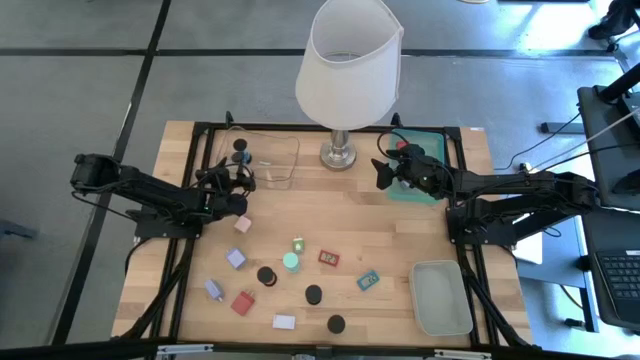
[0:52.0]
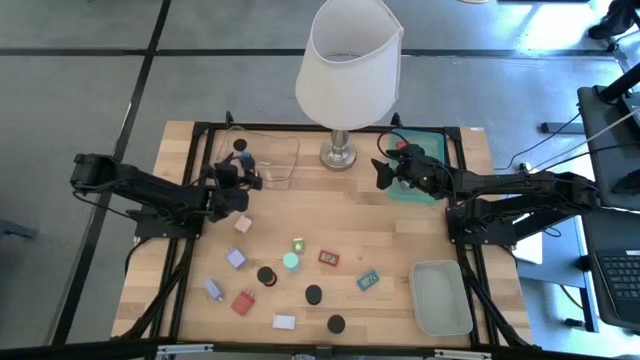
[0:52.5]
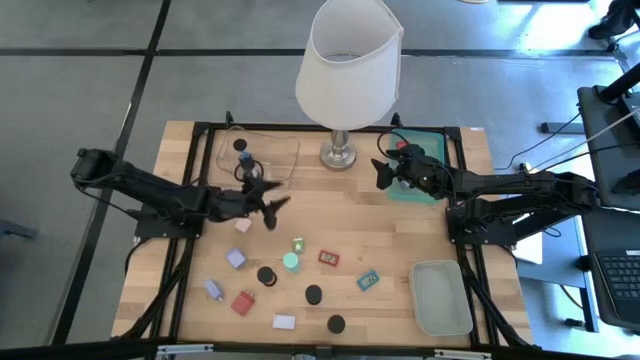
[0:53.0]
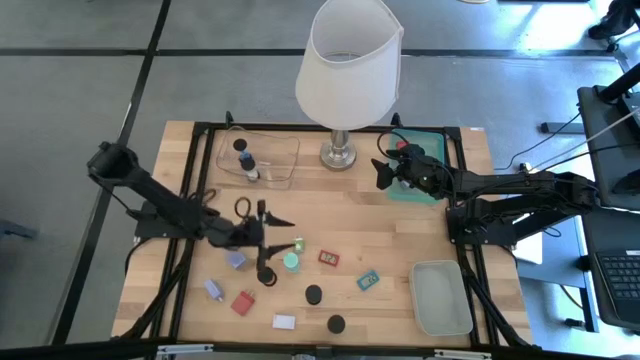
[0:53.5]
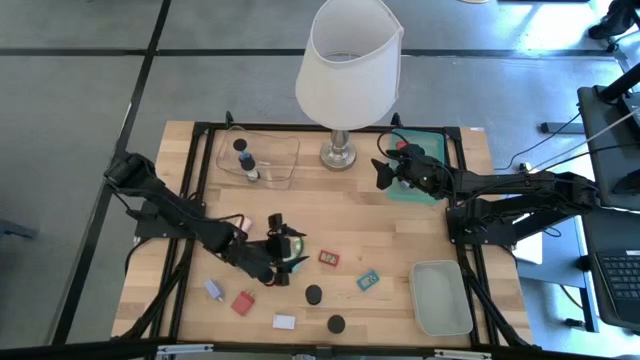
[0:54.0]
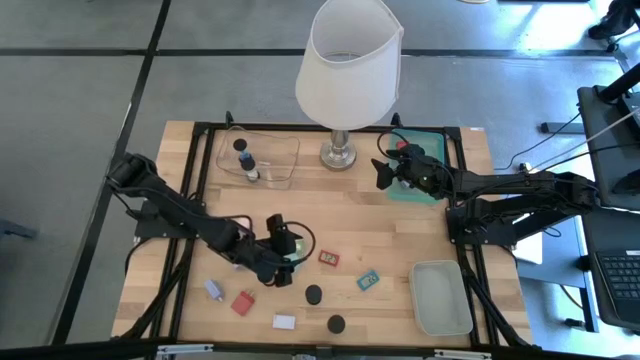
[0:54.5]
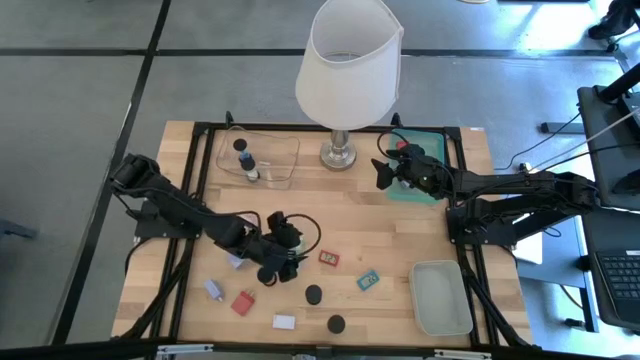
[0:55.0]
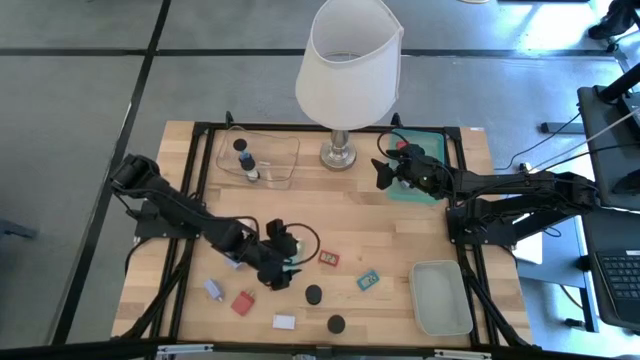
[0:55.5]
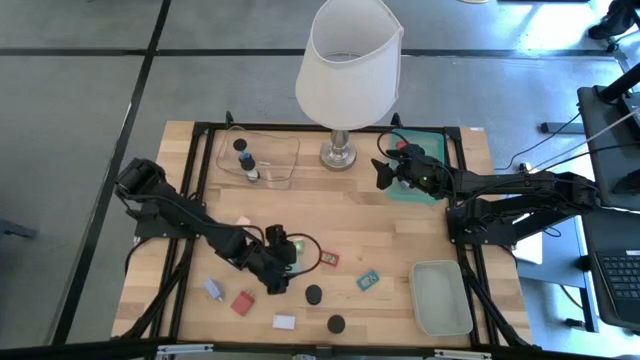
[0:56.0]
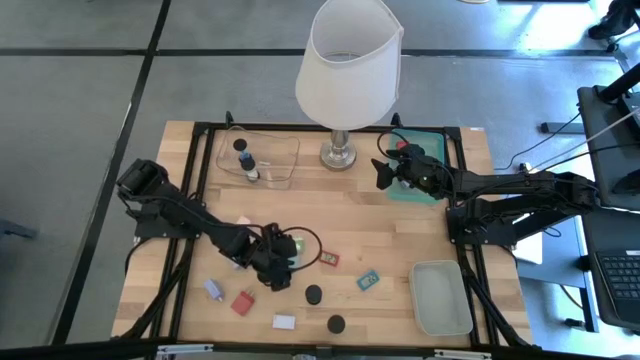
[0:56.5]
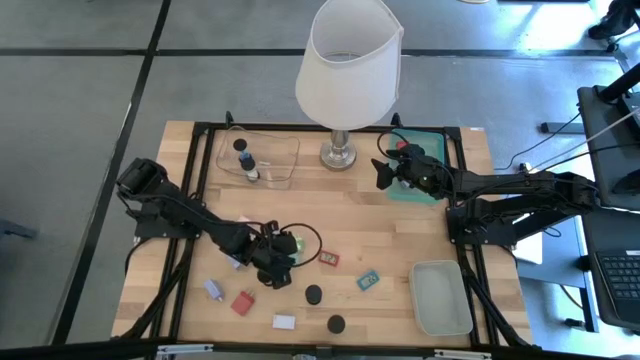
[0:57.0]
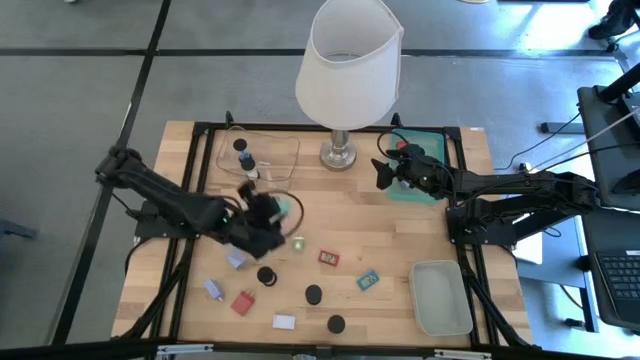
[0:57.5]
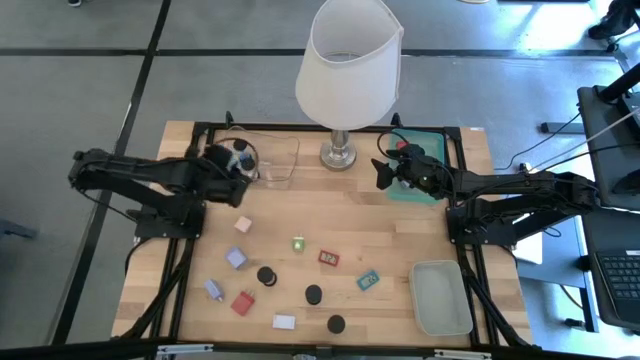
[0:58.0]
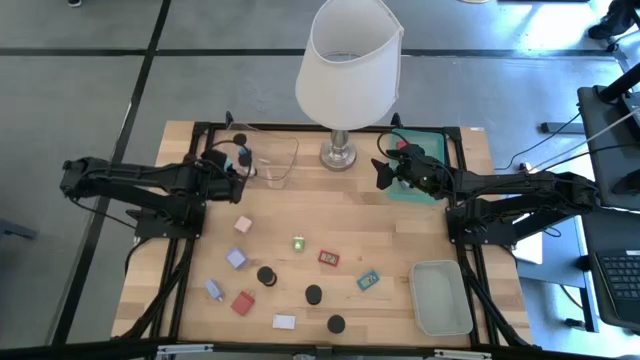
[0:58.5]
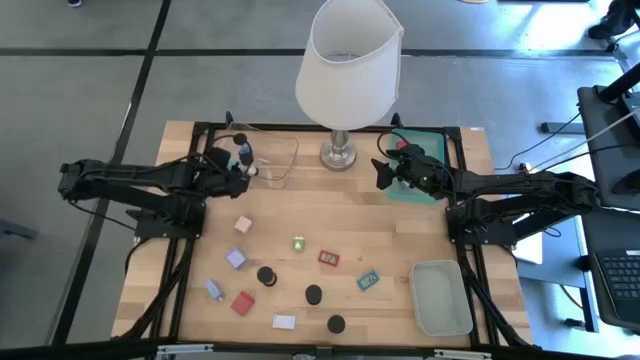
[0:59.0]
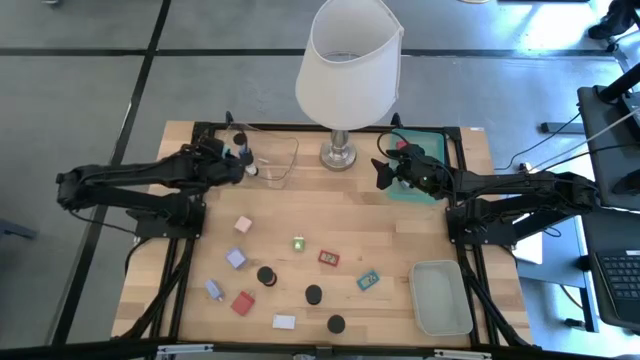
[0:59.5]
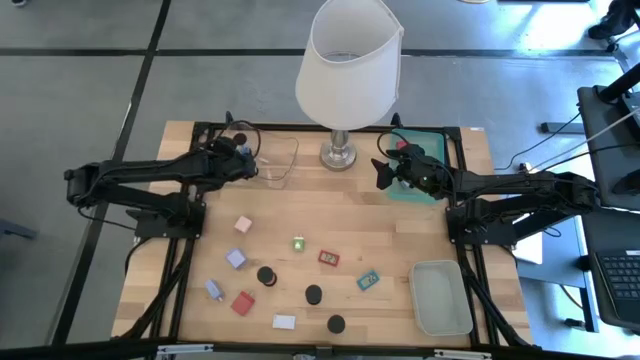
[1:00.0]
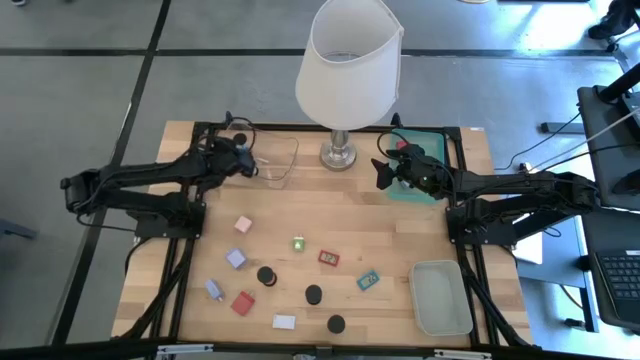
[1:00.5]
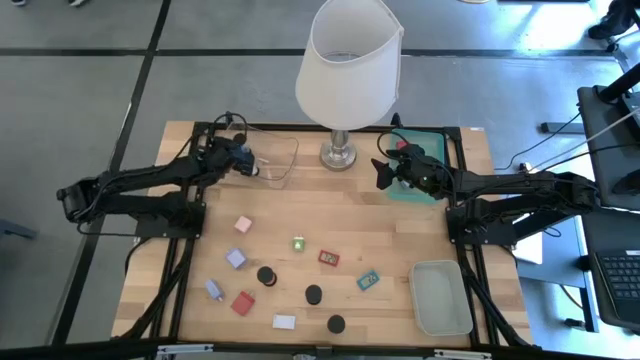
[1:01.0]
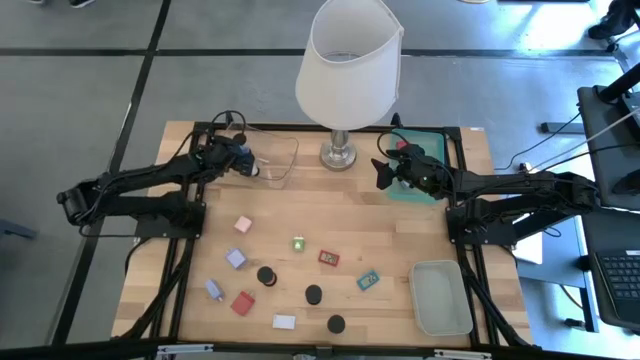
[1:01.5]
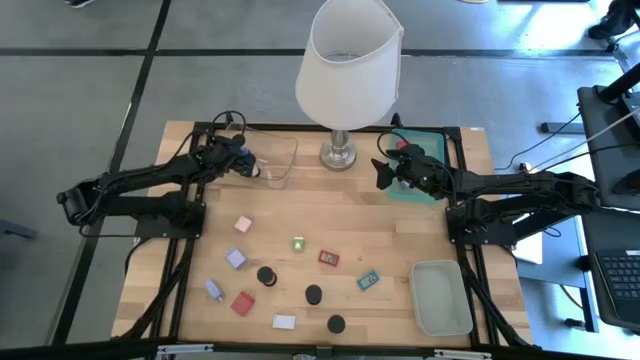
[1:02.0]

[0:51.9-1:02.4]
Task: Pick & Place Office items
Put the light green hourglass into the transparent bin

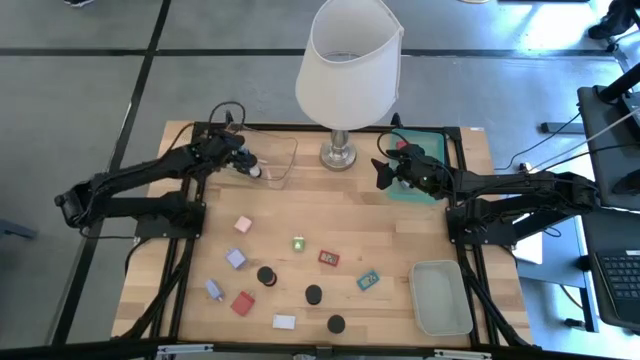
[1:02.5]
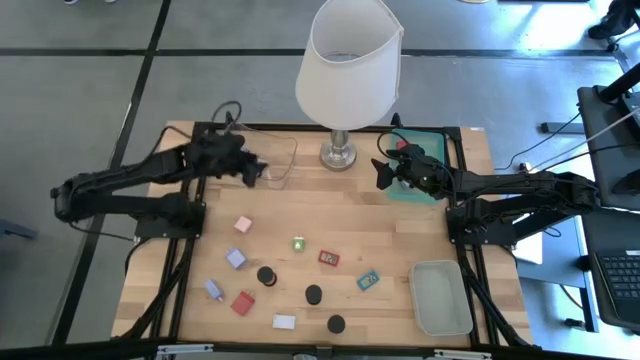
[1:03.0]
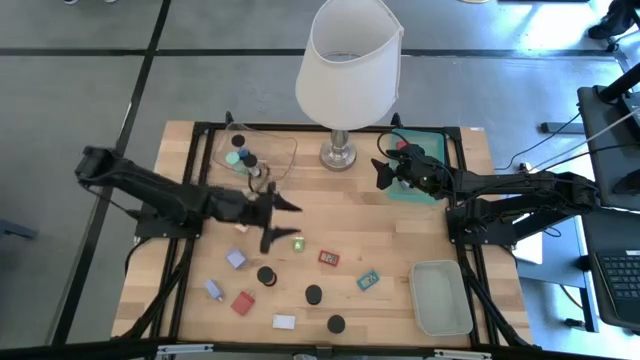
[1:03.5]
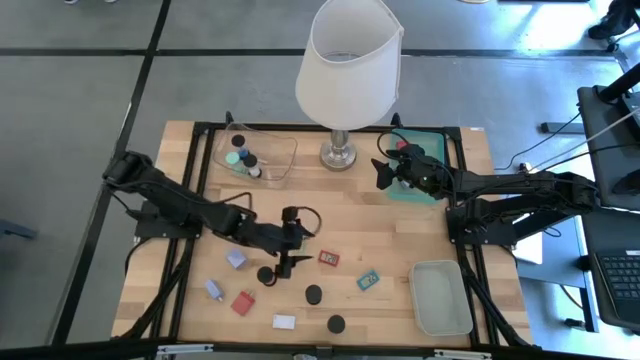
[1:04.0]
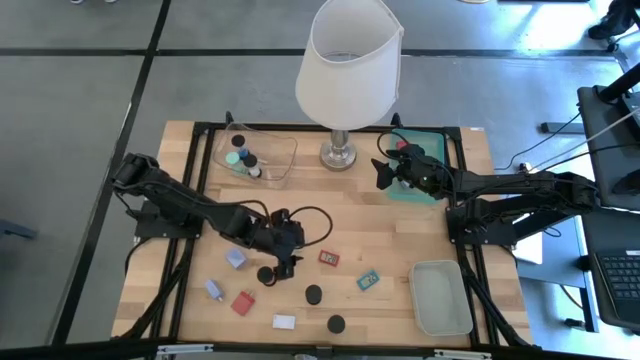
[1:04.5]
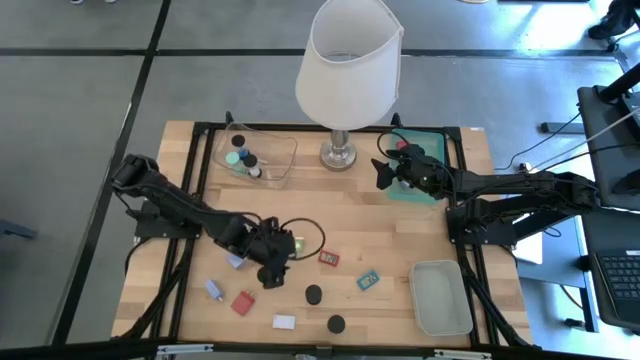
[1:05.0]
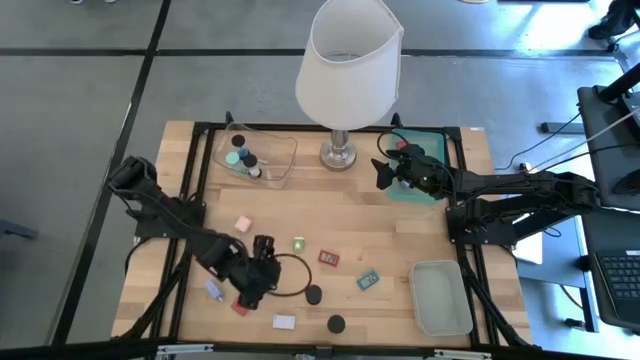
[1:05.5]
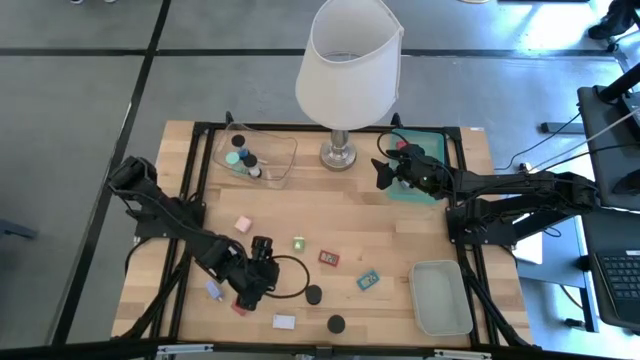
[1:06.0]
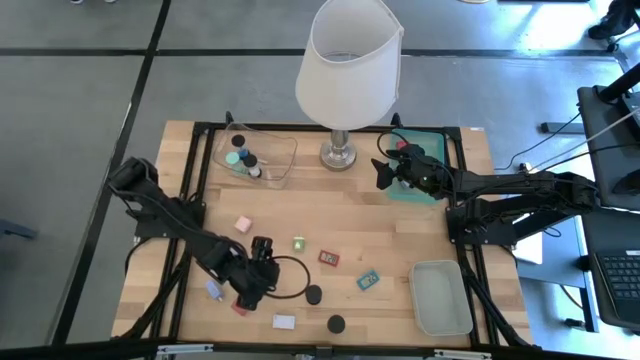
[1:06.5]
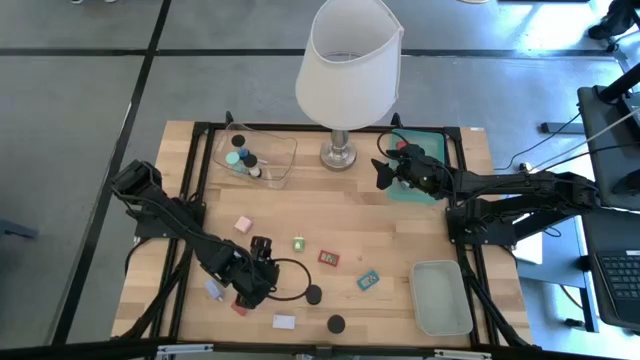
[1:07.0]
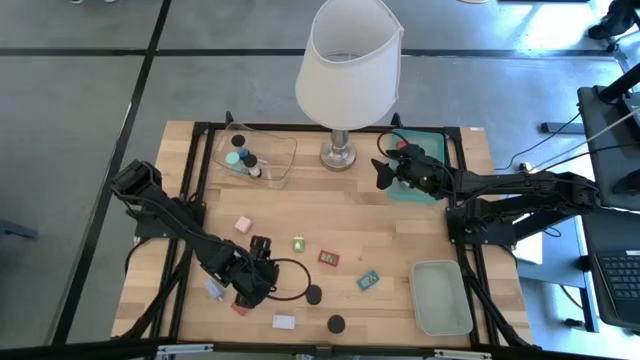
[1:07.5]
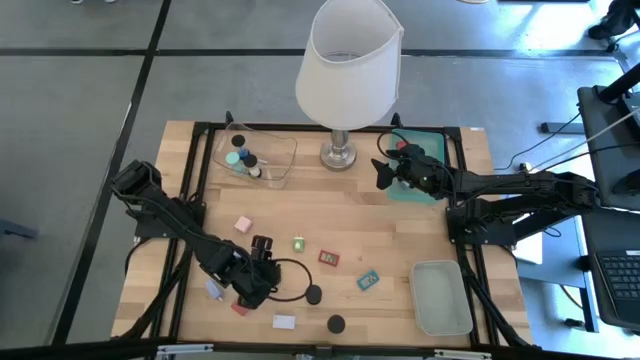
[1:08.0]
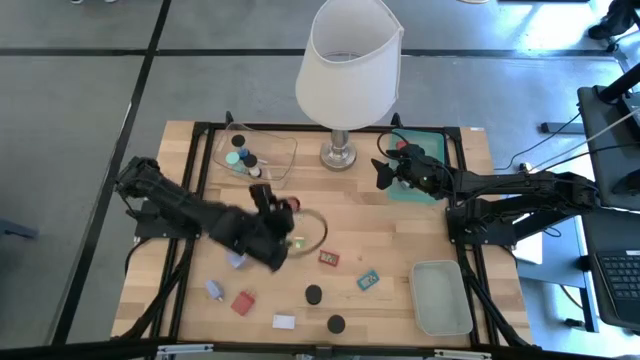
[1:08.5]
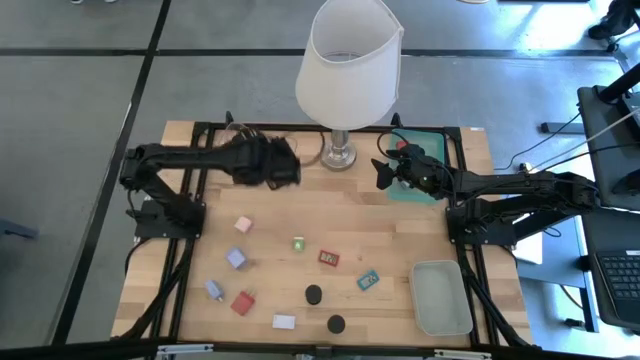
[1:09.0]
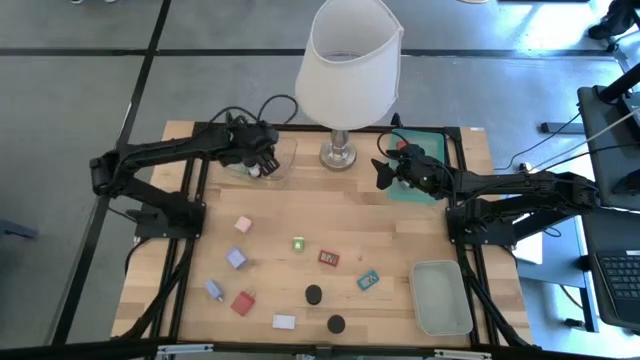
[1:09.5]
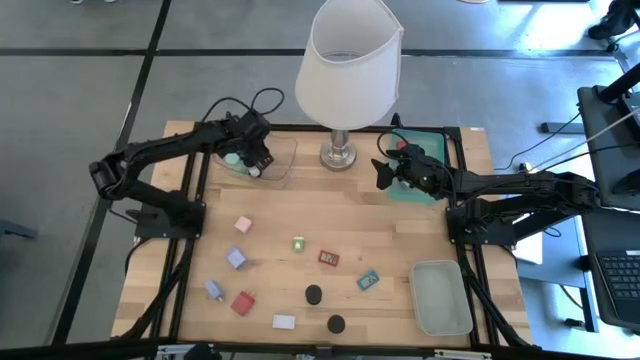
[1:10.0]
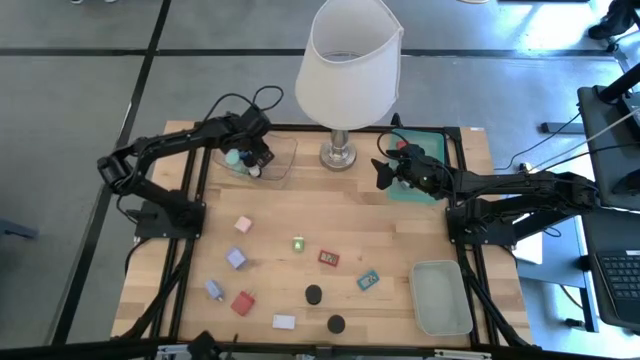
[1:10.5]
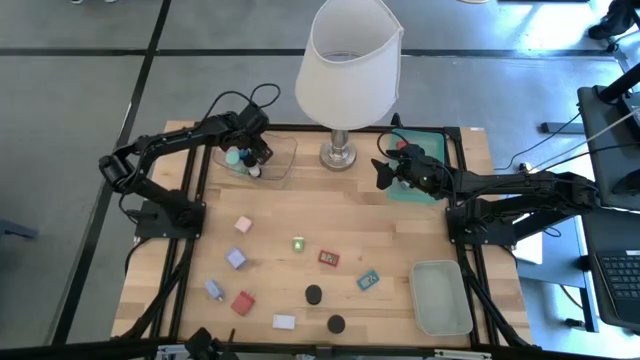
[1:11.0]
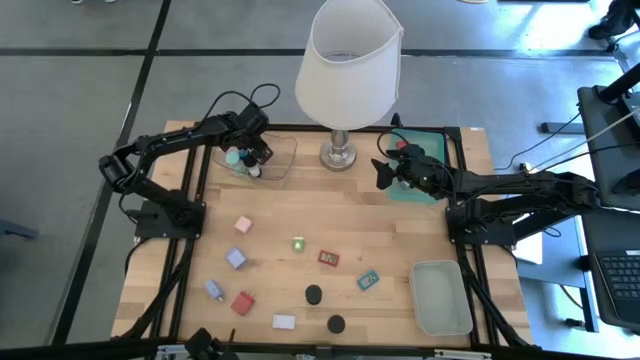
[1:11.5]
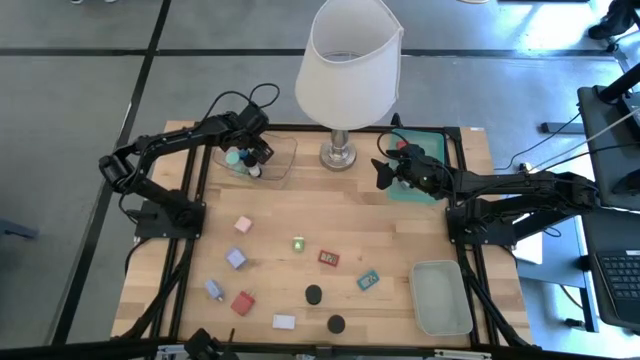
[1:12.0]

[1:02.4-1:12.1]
Put the red hourglass into the transparent bin

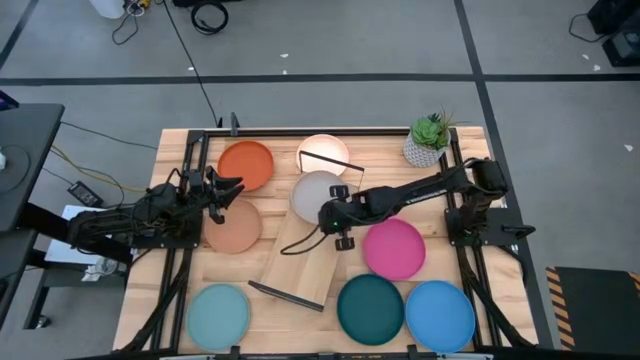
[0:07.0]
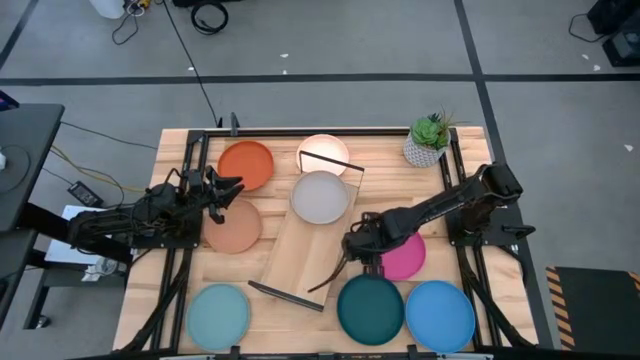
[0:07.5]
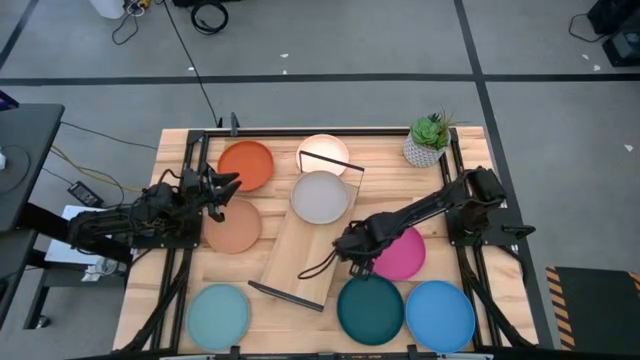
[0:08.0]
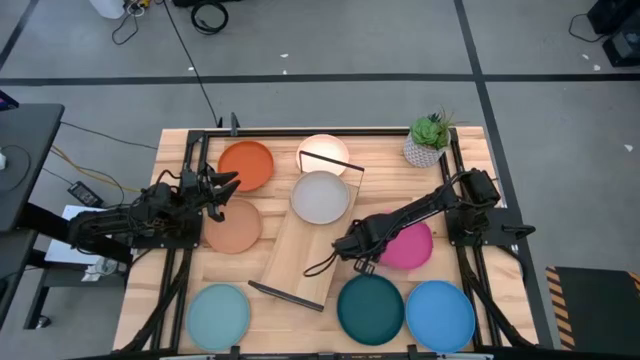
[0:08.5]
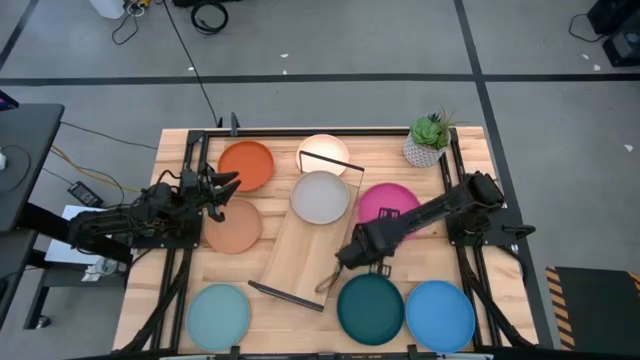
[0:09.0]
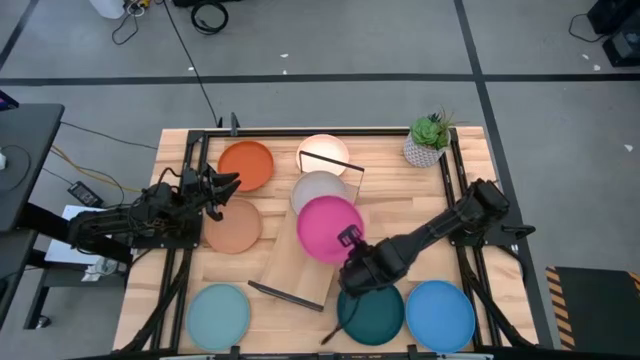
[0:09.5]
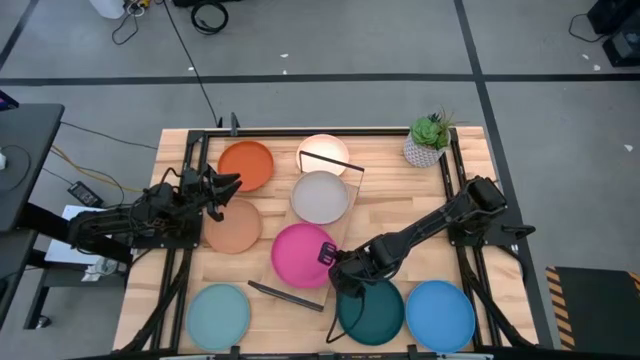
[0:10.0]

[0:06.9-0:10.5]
Task: Place and stack plates onto a shelf
Put the pink plate on the shelf
